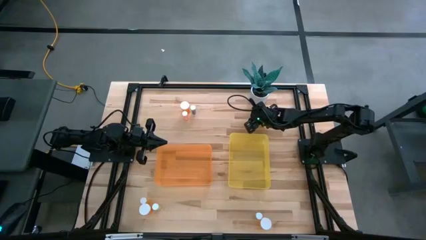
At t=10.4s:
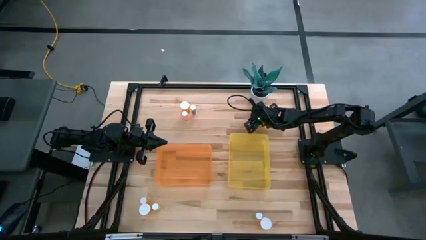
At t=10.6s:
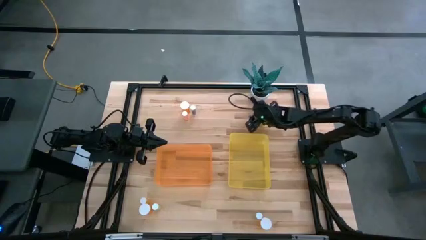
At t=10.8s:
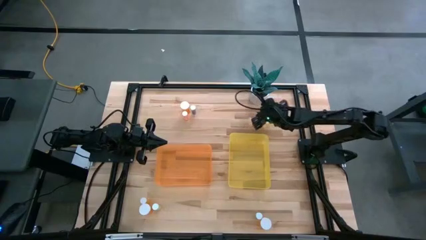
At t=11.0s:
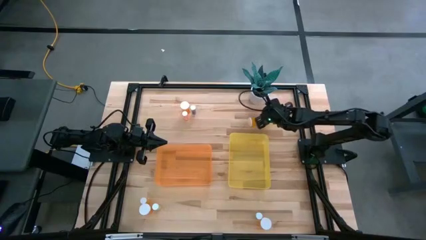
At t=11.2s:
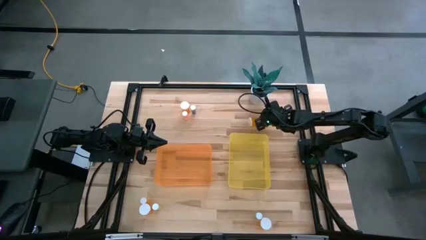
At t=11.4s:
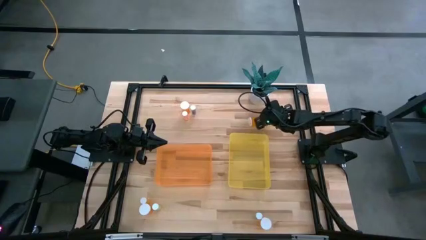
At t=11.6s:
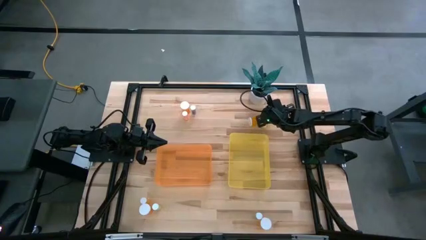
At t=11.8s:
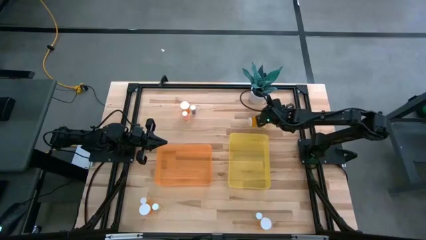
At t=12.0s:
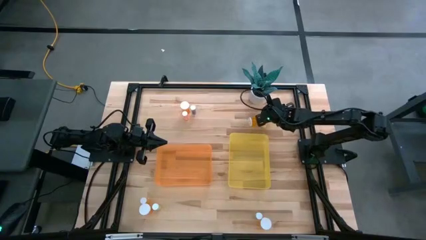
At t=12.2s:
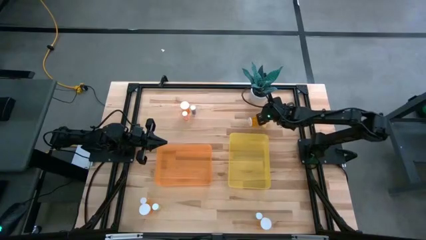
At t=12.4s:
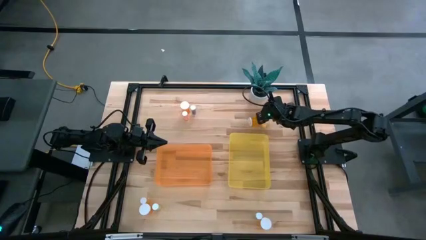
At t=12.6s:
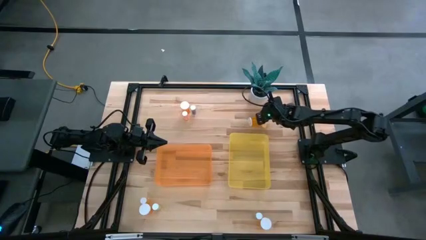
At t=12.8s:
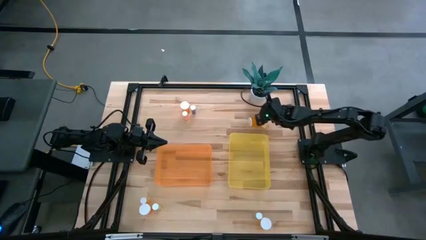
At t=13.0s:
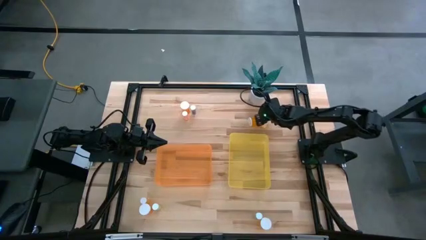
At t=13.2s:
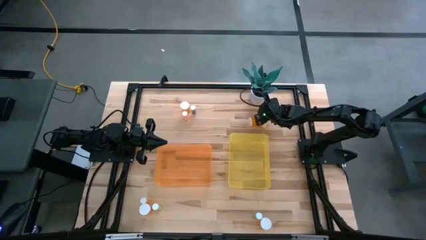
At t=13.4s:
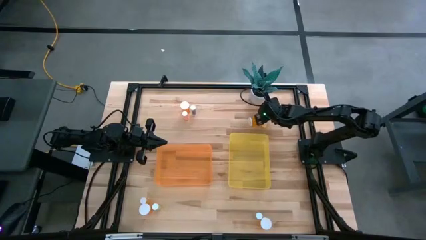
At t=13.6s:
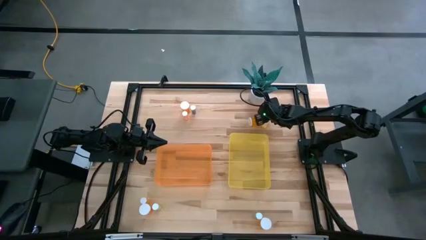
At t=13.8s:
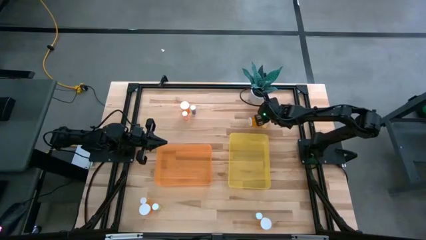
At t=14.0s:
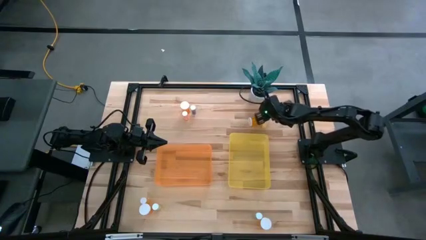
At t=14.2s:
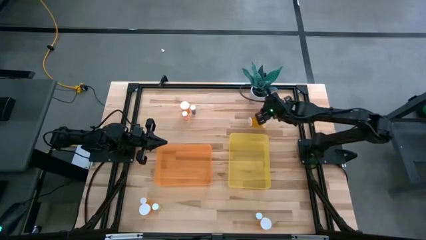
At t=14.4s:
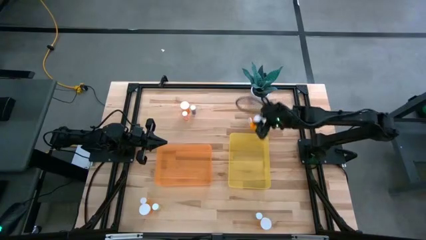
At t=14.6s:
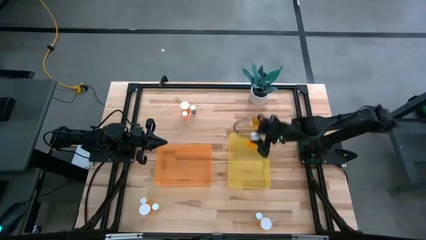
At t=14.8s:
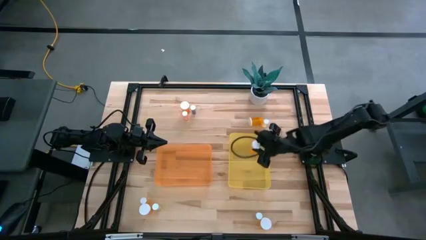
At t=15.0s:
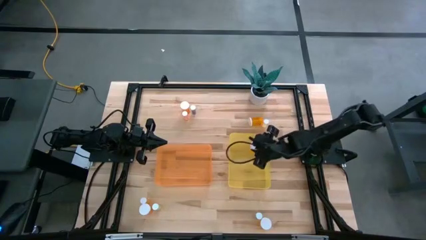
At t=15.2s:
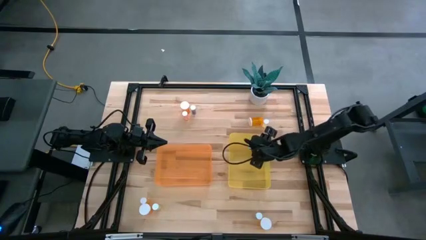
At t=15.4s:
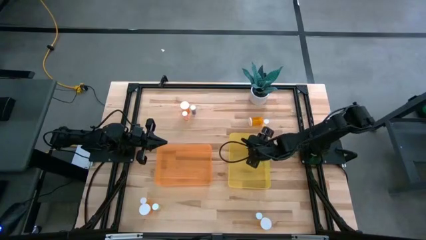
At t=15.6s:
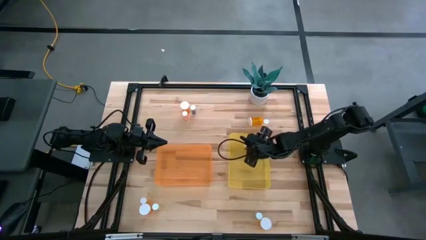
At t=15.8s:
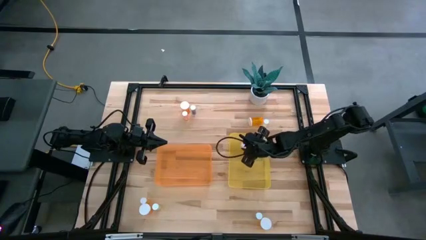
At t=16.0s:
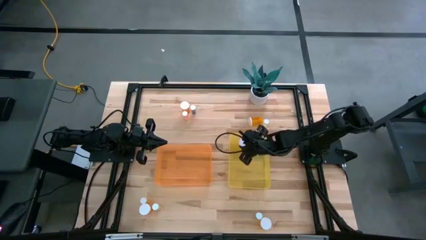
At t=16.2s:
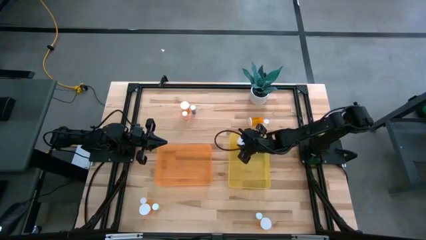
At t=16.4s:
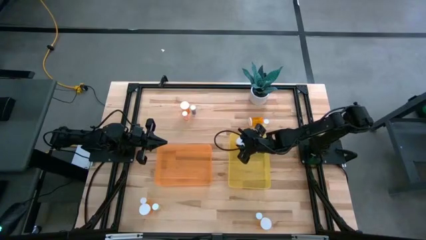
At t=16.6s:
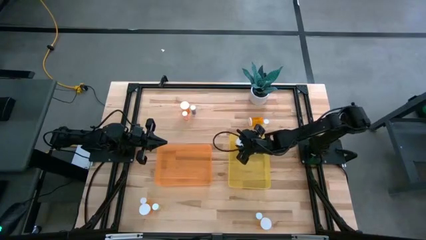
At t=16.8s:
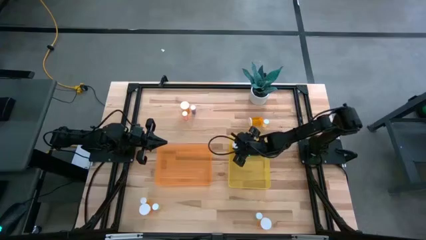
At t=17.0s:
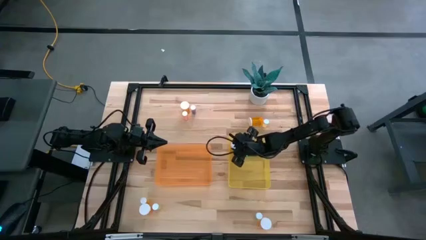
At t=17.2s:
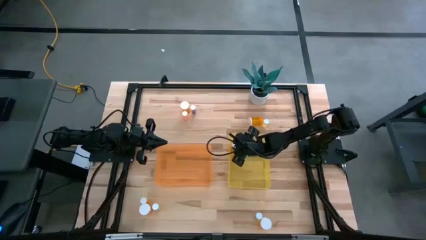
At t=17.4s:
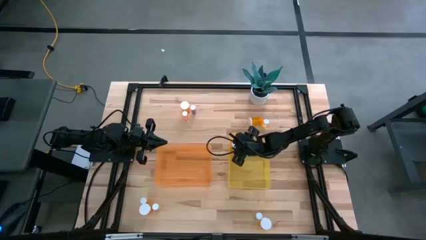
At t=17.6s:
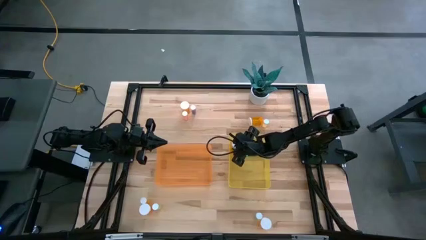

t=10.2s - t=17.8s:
Task: Pick and place medicine bottles into bin by pill shape (circle, oval)
Put the orange capsule bottle into the yellow bin

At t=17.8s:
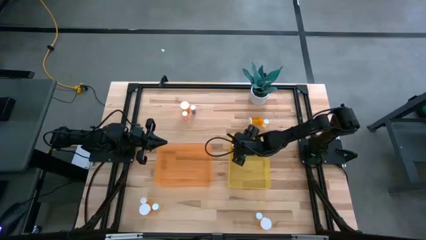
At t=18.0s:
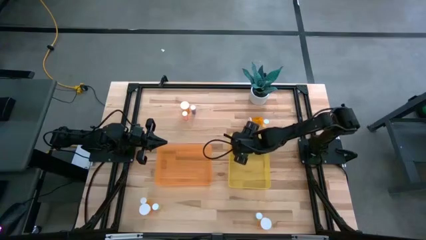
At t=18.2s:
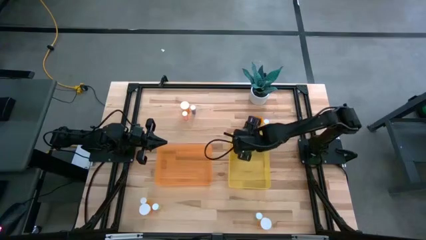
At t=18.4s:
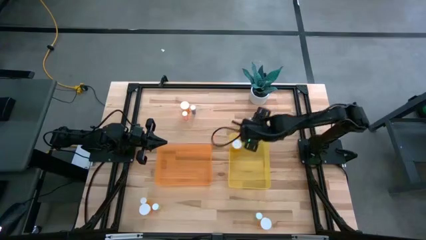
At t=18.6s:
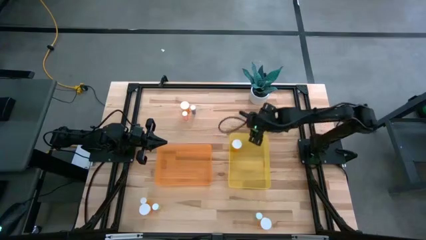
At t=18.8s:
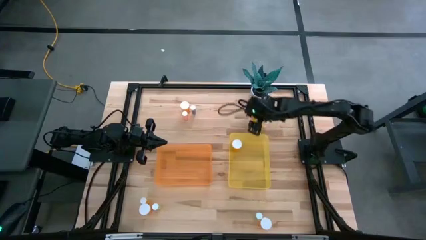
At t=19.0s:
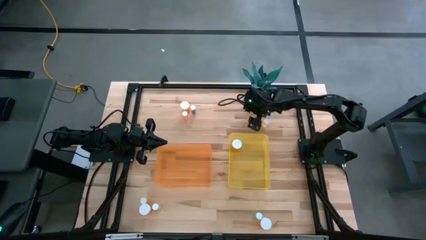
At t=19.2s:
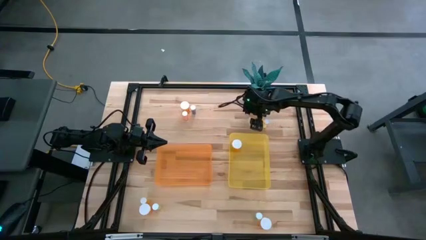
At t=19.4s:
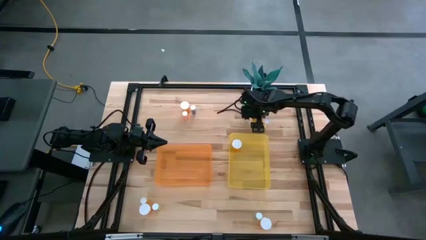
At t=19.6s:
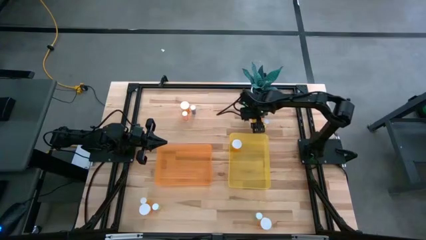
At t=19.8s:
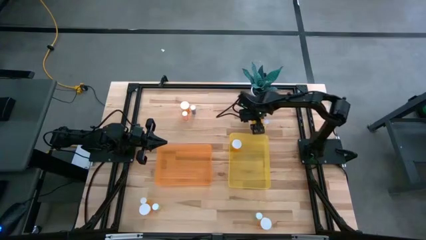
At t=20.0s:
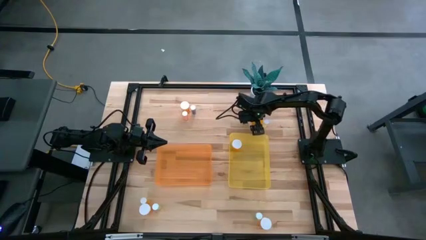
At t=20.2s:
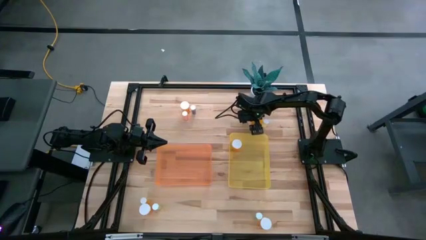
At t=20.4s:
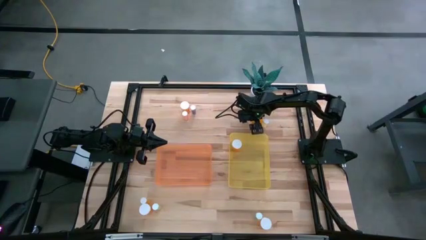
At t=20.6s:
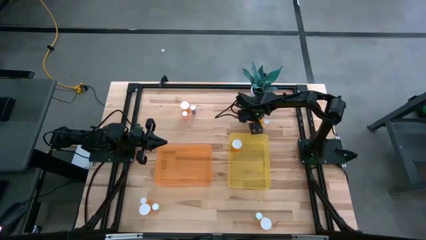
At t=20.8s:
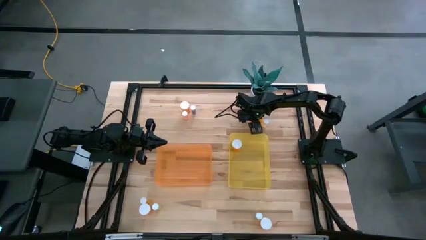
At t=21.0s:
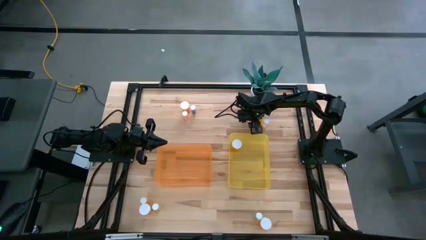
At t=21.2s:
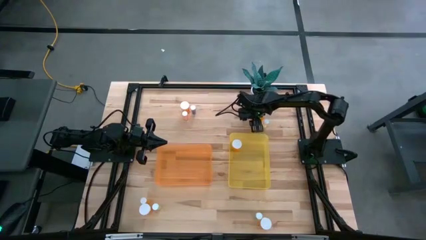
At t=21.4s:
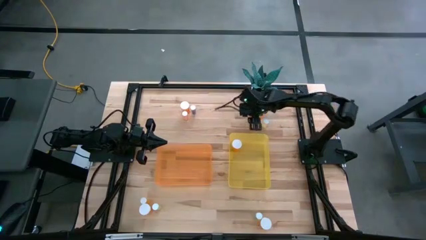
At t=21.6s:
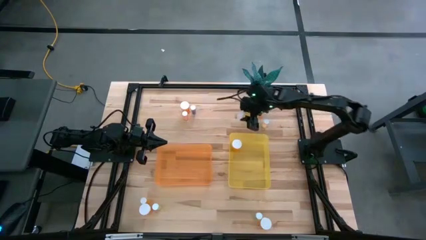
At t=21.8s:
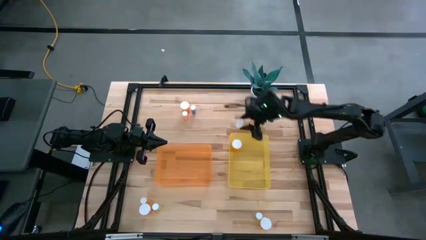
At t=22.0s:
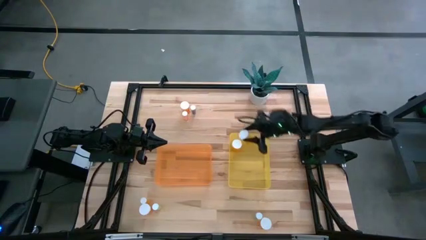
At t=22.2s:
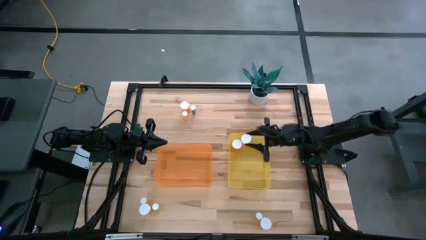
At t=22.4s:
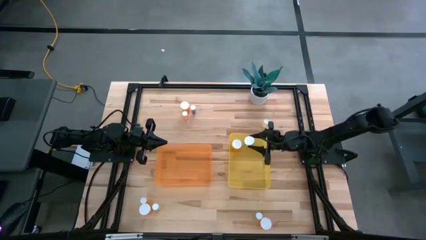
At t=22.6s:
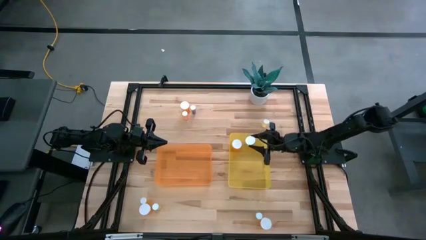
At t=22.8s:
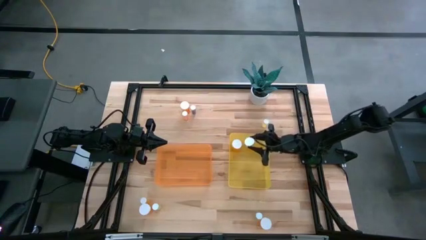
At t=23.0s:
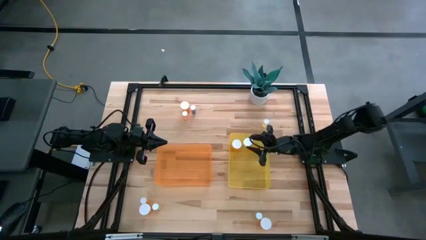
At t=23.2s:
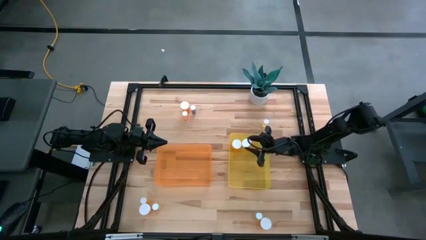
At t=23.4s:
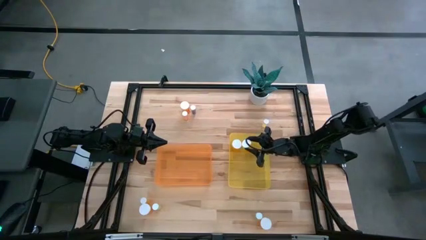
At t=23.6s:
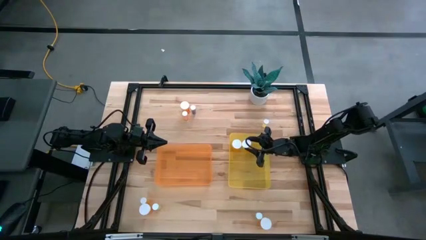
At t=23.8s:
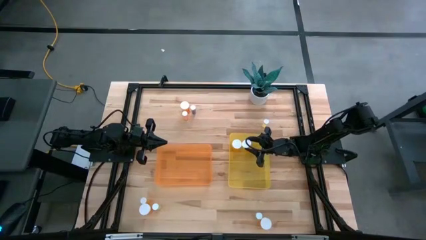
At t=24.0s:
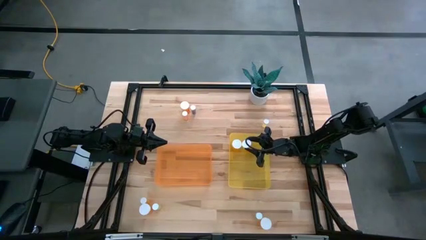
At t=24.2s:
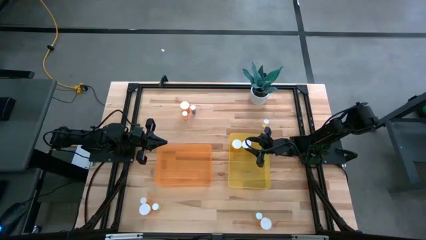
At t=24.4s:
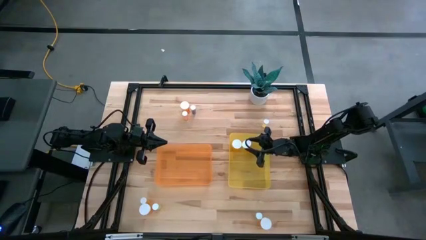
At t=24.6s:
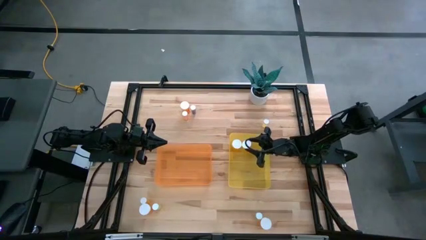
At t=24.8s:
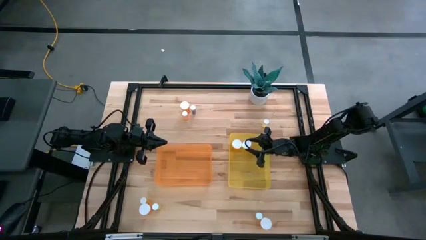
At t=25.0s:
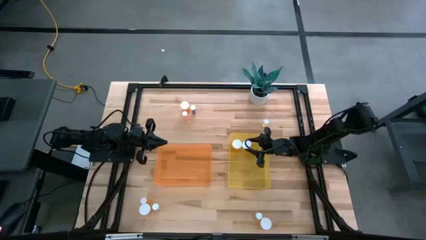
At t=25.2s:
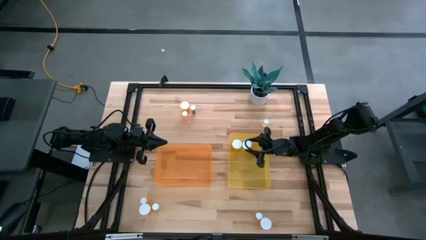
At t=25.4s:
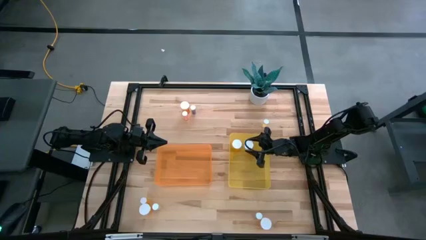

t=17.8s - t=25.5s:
Put the orange capsule bottle into the yellow bin

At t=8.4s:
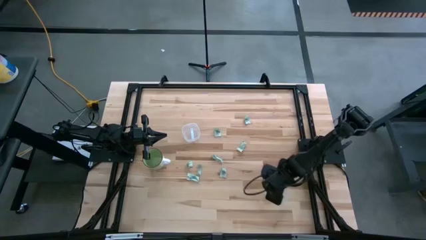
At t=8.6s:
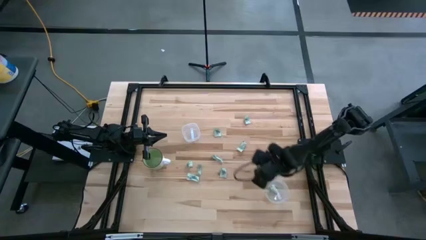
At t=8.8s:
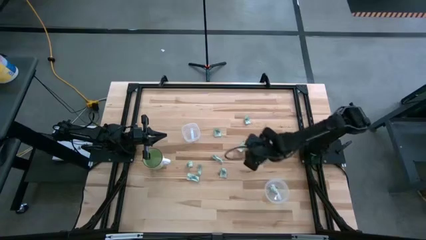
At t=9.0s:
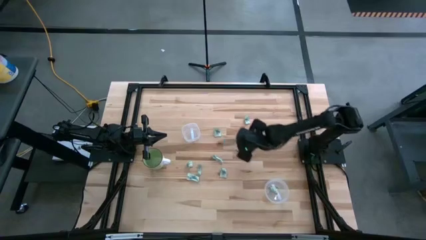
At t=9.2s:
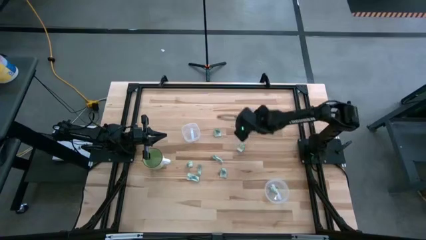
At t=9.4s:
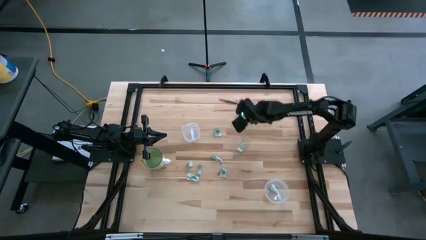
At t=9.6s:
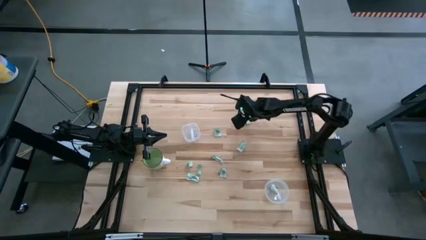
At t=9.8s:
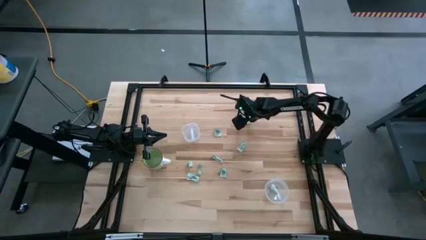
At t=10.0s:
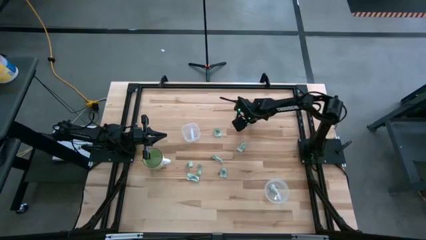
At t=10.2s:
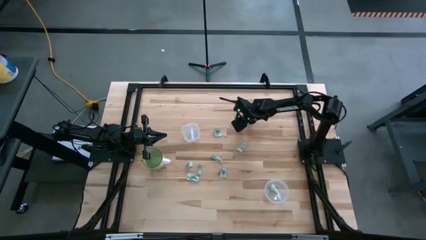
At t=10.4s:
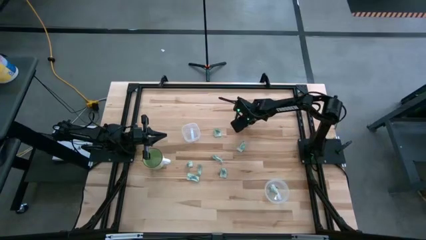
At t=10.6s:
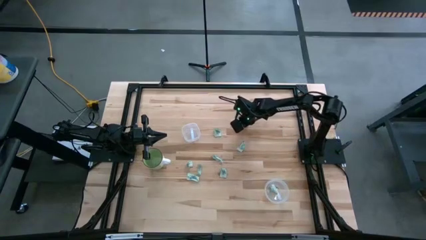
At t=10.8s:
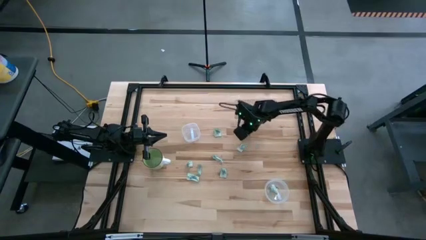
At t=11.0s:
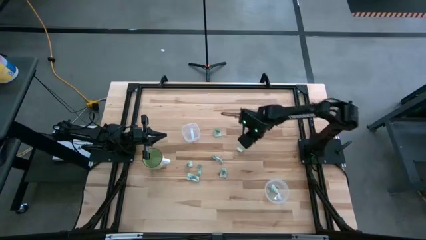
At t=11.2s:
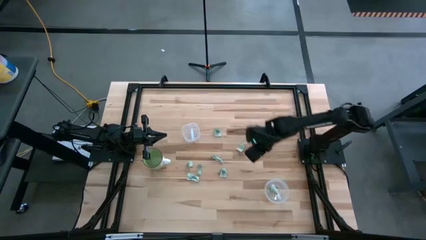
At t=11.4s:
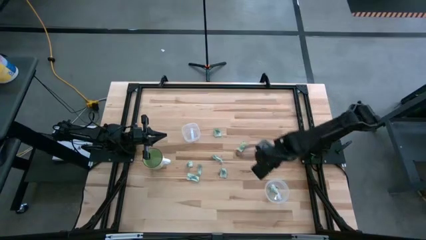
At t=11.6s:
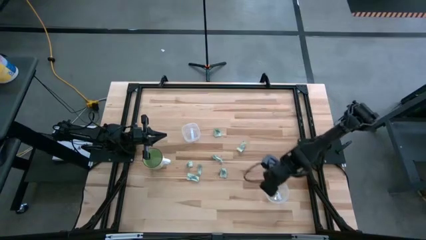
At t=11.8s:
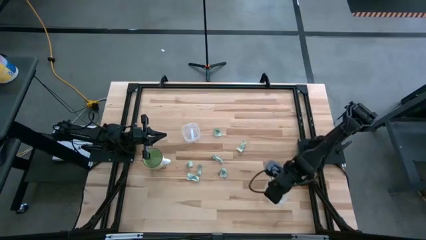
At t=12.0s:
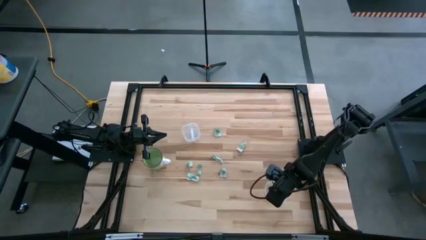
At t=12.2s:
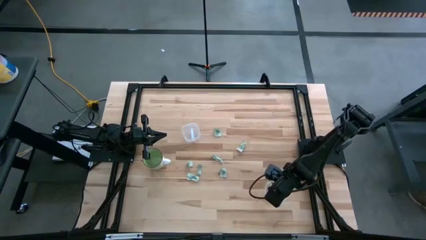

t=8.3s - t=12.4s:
Task: Pick and place items into bin
Put the green stevia packet into the bottom transparent bin
